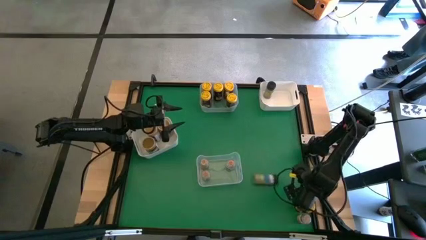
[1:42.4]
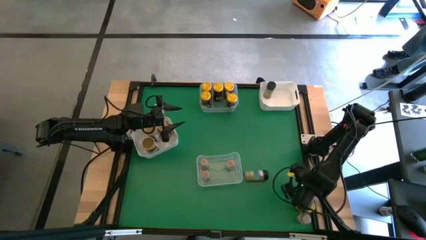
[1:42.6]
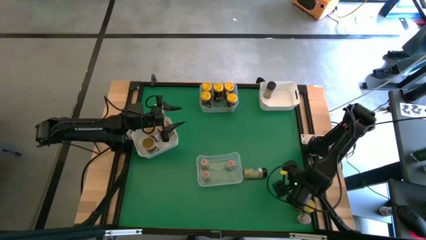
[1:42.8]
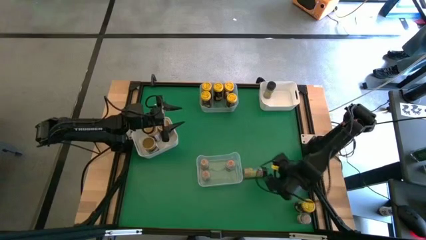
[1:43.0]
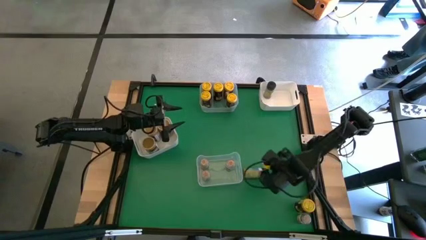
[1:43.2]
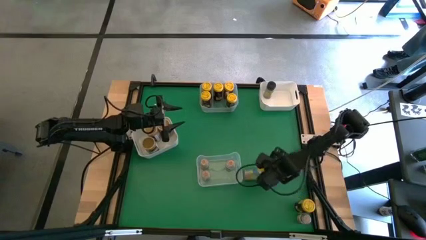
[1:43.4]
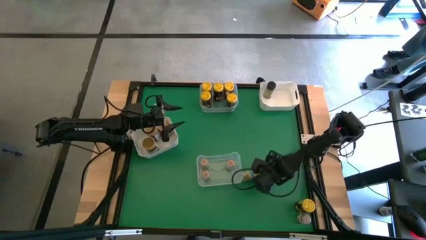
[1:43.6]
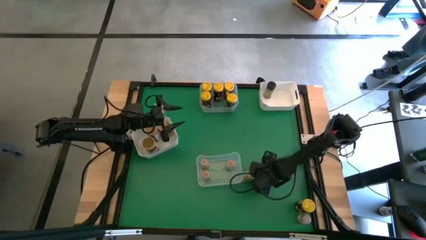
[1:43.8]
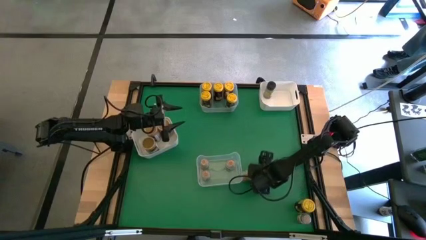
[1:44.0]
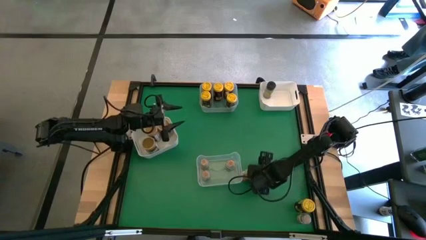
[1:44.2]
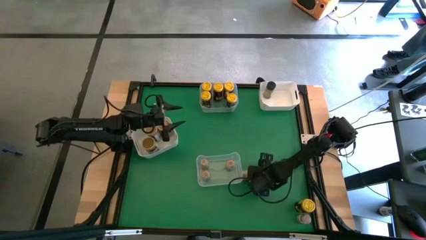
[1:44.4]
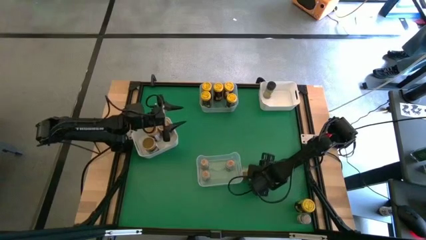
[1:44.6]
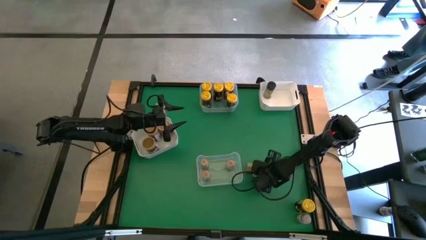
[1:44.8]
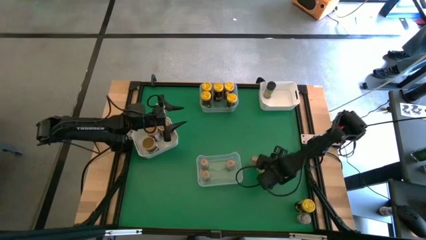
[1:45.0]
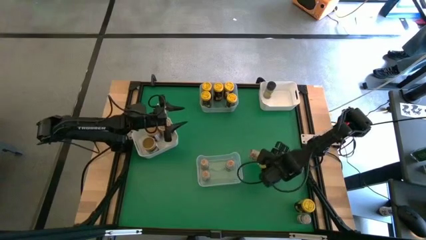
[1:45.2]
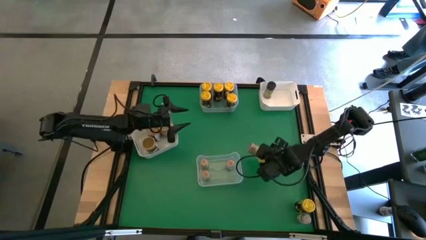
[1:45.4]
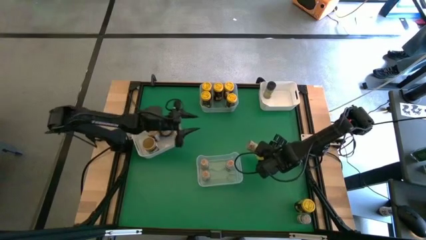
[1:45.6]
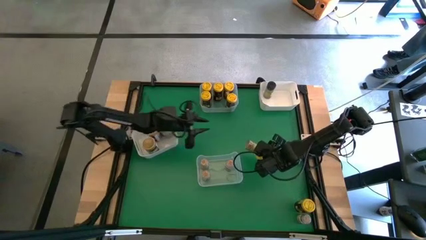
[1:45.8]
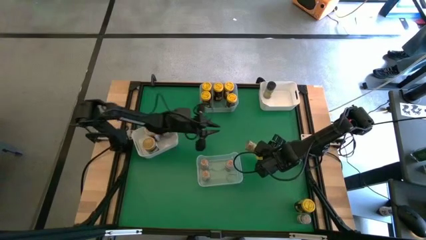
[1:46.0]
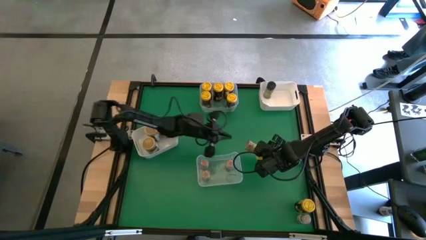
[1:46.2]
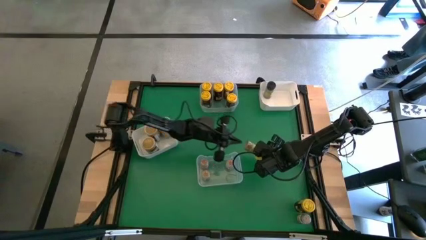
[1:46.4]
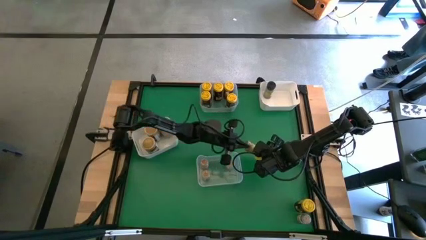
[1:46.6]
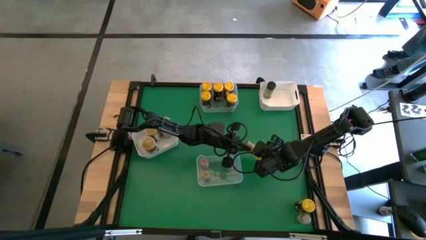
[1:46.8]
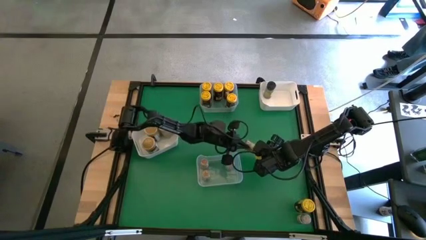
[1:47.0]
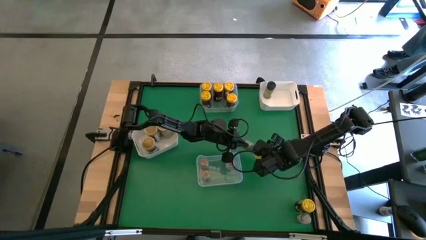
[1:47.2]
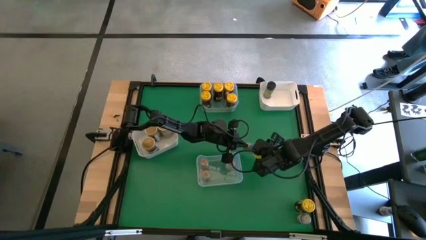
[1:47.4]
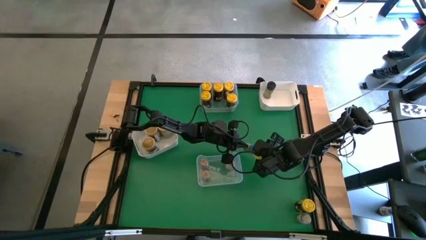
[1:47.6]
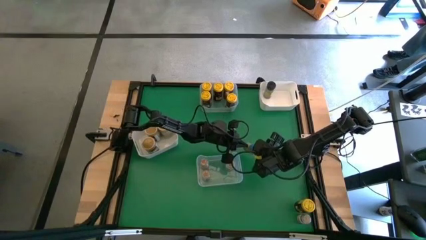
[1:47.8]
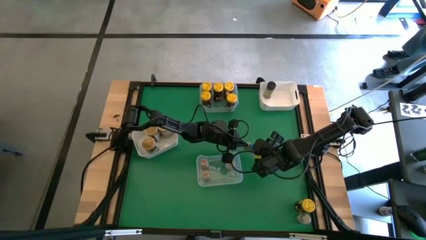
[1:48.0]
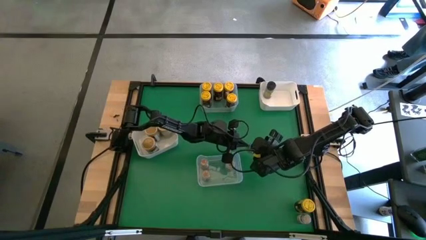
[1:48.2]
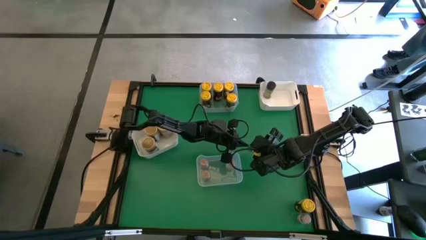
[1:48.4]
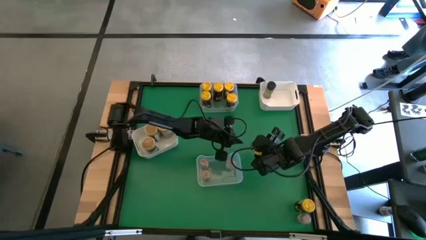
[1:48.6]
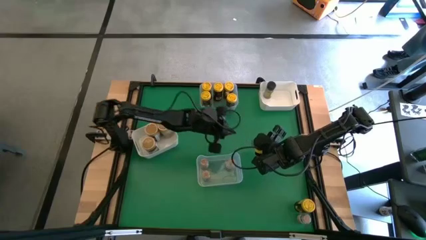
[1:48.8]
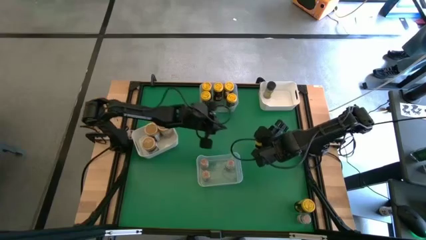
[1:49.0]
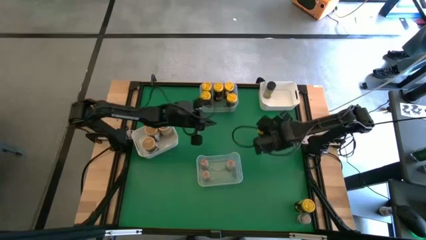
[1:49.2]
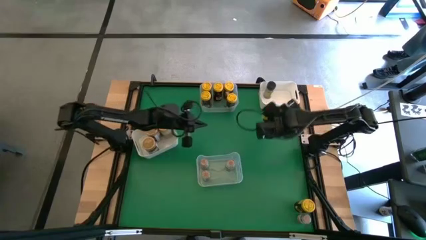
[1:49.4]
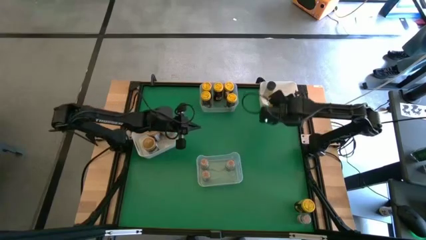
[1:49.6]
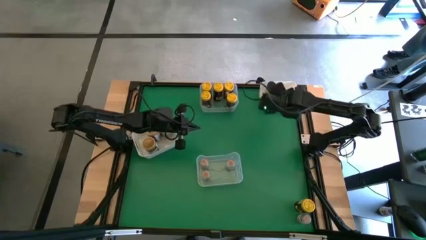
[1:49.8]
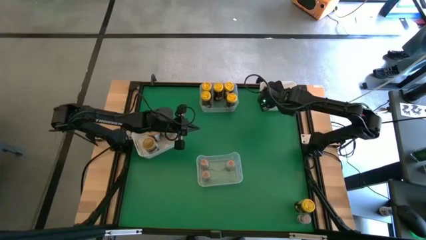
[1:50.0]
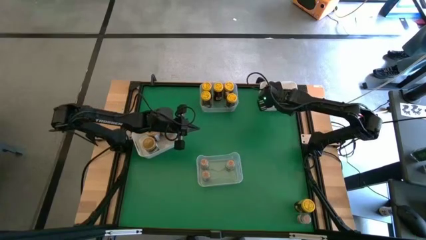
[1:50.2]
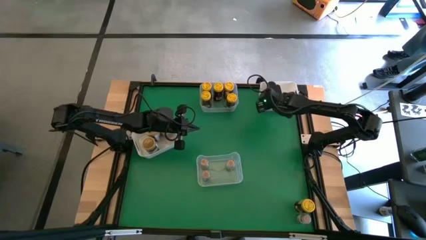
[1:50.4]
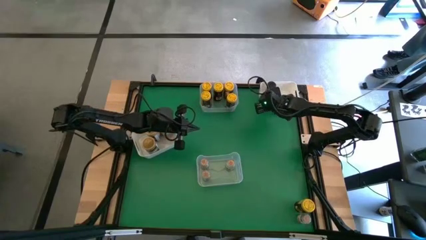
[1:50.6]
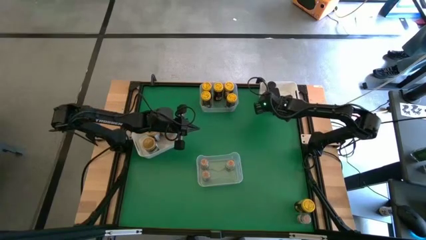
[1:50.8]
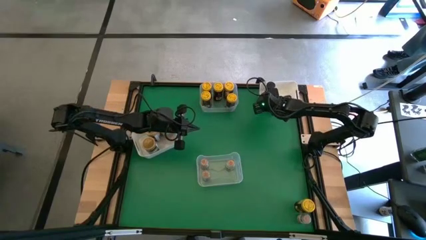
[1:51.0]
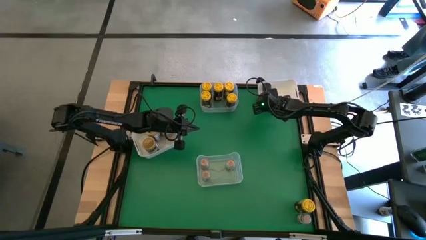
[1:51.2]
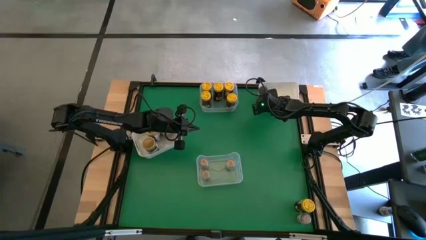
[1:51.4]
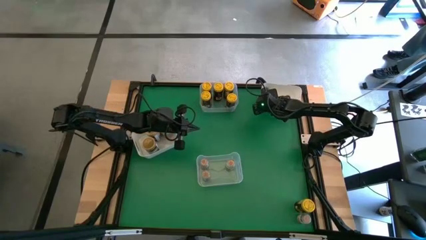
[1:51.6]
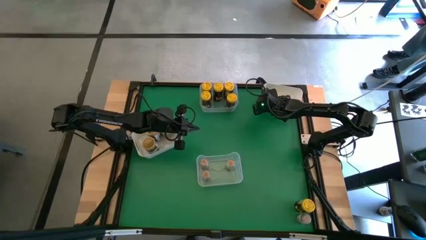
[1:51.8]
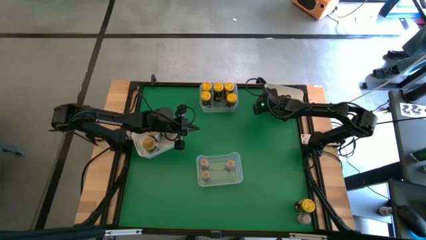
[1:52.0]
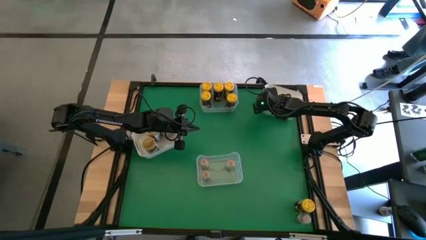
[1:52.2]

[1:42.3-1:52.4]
Task: Sort spices by type
Put the black spice bottle into the right white bin

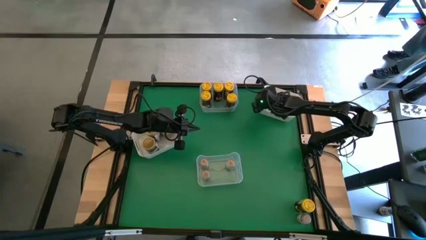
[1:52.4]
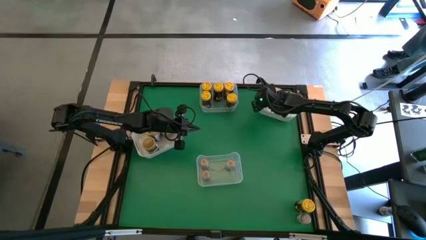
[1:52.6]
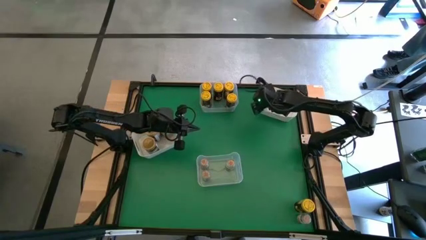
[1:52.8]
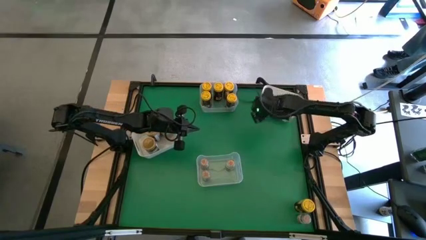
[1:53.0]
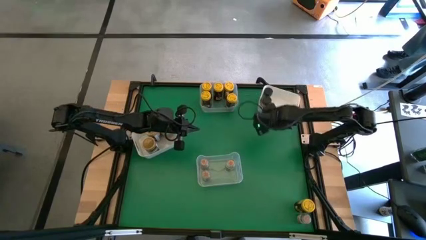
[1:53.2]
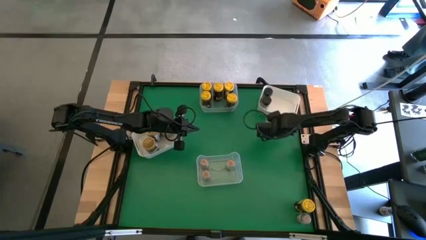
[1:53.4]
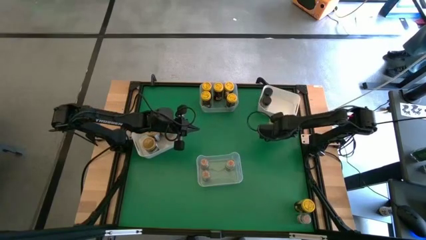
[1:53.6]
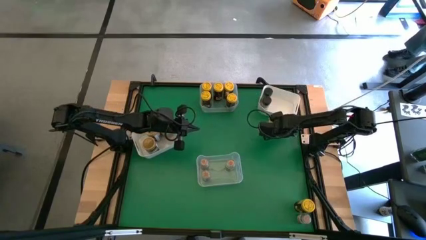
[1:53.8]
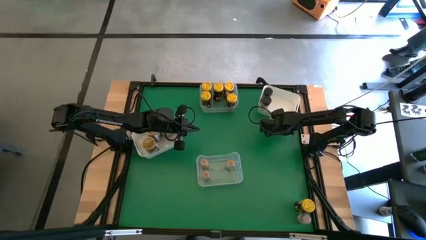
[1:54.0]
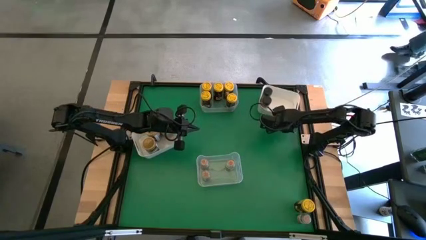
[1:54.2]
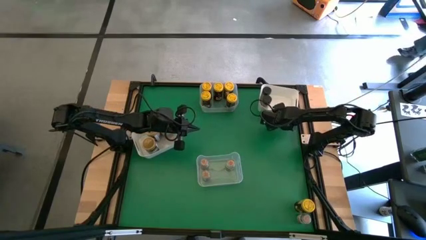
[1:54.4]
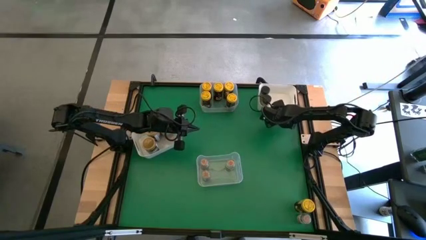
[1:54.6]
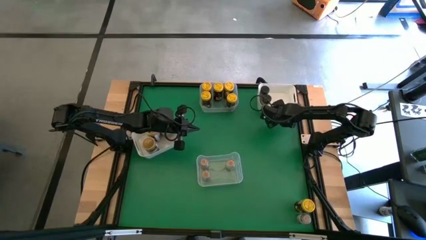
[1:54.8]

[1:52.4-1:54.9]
Adjust the right white bin

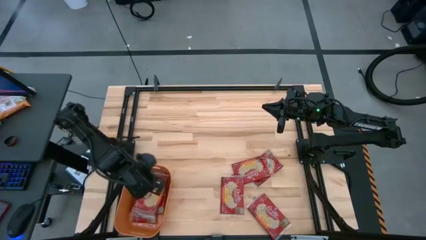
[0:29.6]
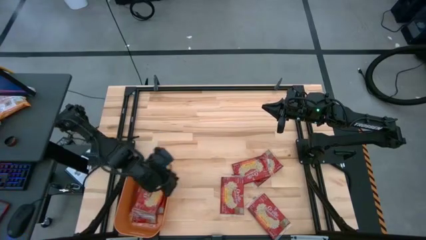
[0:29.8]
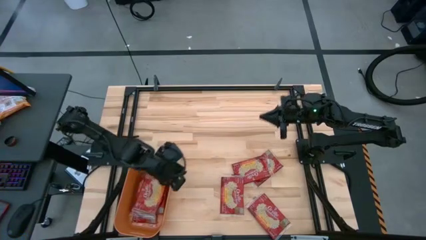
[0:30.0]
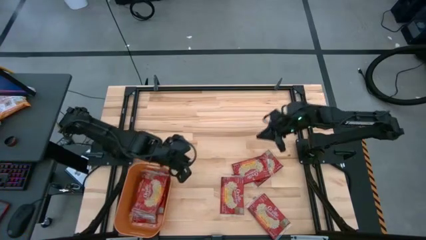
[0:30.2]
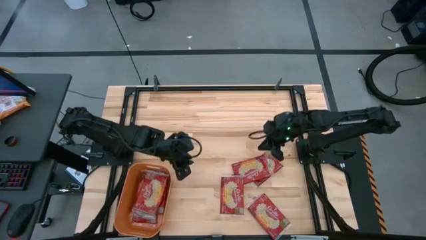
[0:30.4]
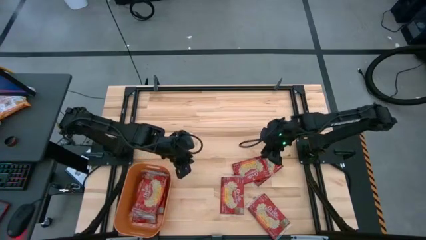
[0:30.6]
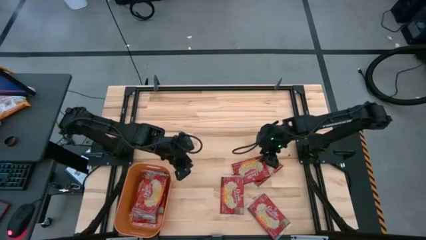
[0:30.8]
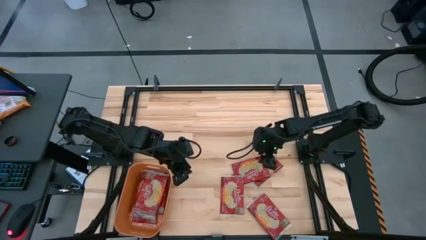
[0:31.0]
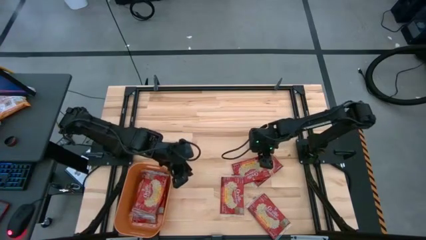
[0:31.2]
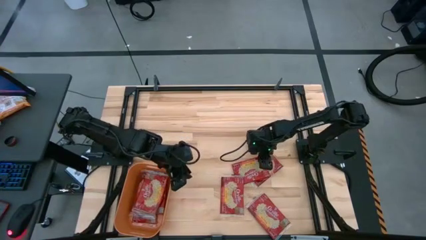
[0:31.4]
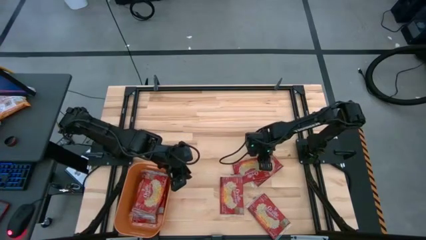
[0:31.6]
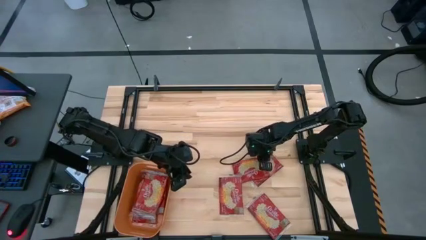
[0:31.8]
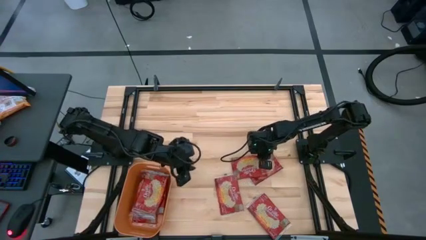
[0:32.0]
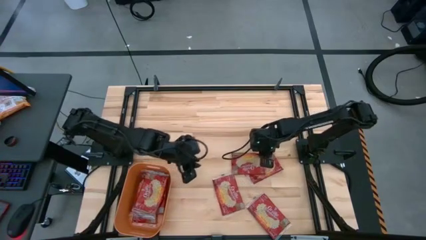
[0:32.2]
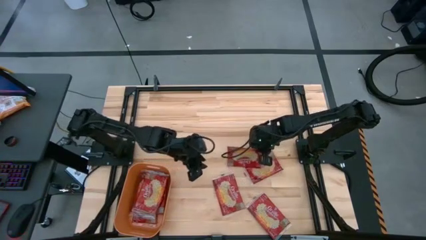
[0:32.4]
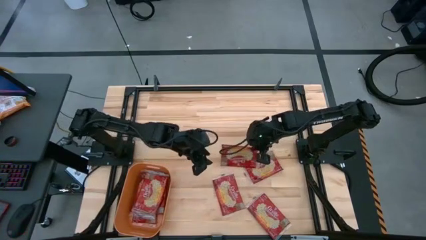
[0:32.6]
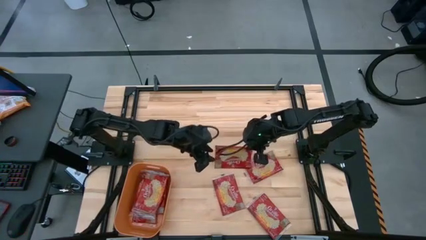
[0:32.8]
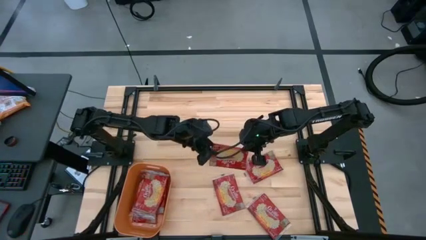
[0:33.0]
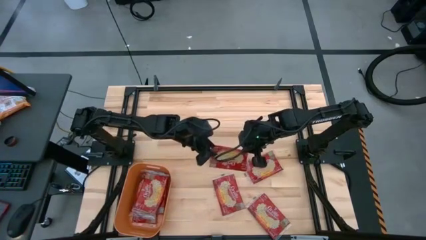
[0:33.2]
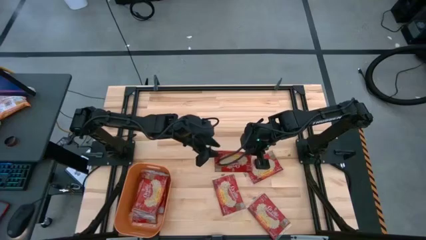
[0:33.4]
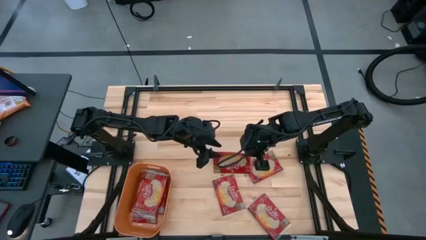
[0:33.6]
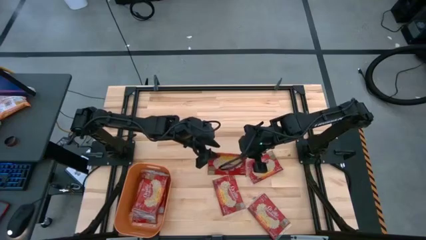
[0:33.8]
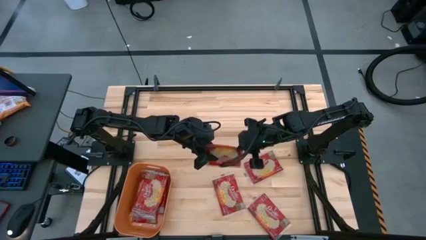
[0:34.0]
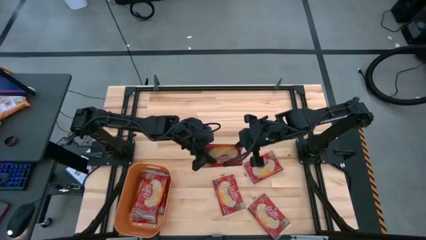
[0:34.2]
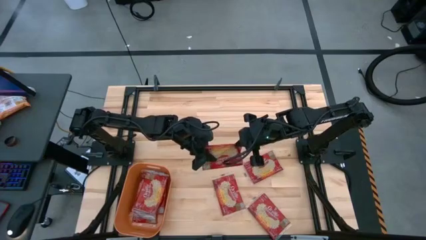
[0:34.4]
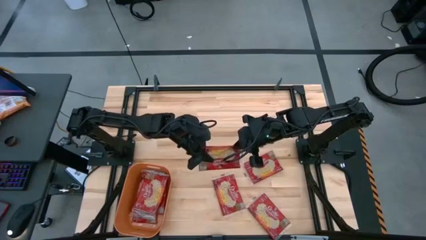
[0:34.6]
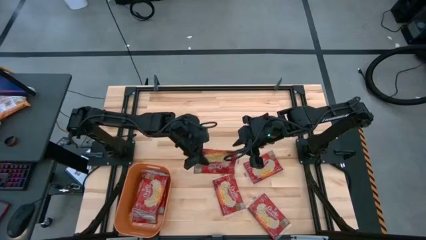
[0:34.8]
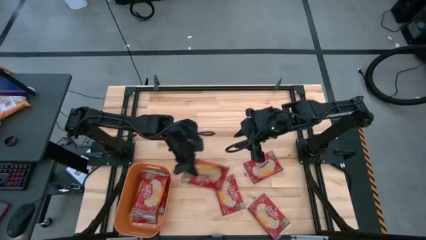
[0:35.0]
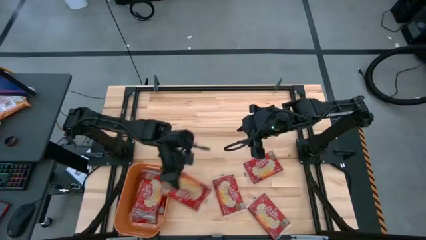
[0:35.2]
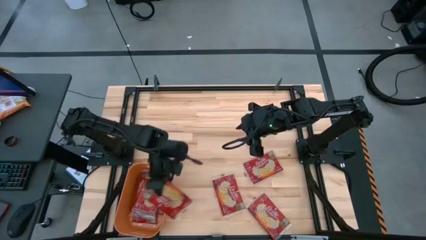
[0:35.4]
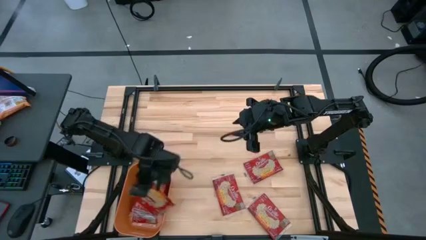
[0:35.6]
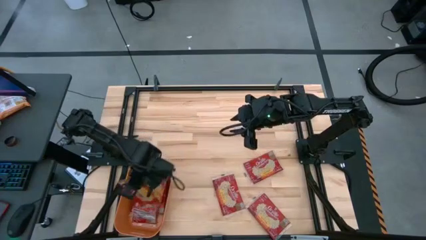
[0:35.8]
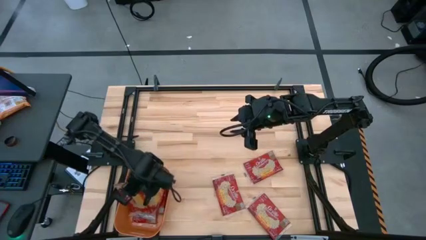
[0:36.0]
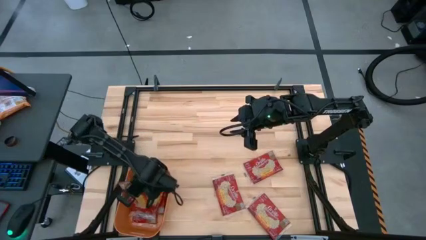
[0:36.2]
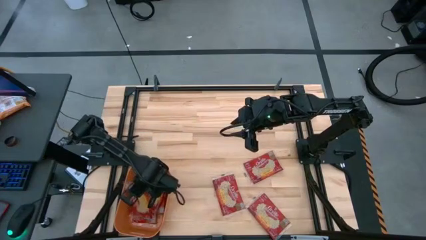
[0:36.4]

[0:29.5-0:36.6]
Task: Sort popcorn bags into baskets
Put the red popcorn bag into the orange container
